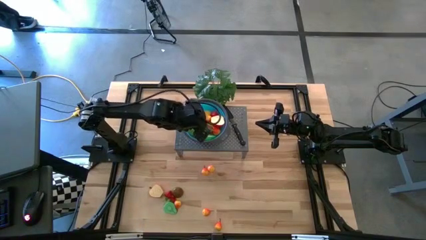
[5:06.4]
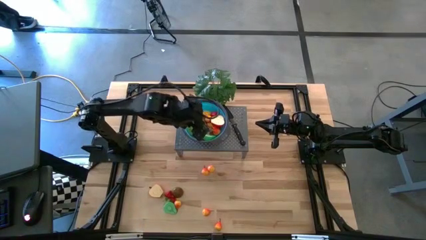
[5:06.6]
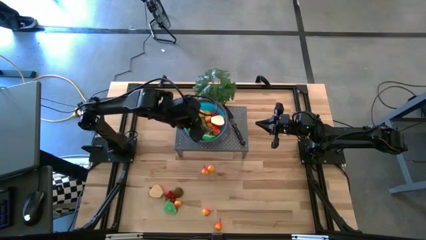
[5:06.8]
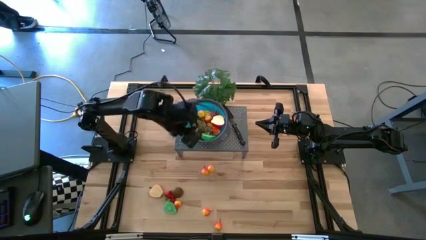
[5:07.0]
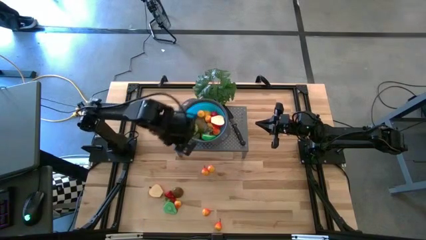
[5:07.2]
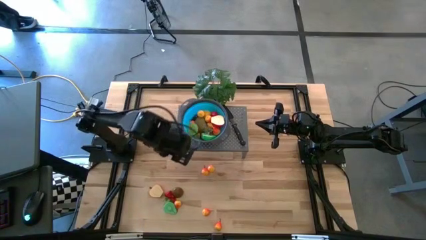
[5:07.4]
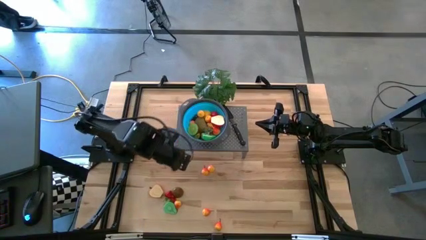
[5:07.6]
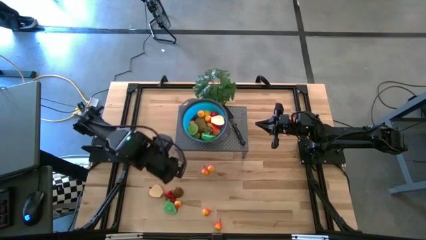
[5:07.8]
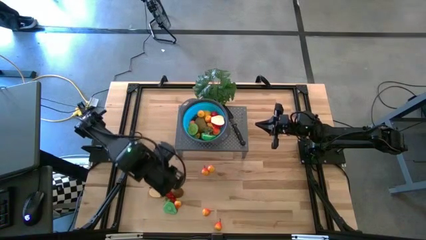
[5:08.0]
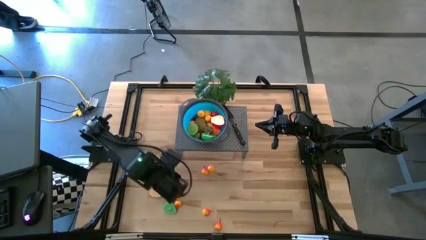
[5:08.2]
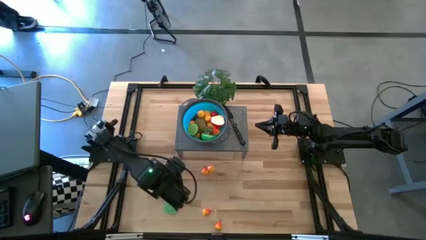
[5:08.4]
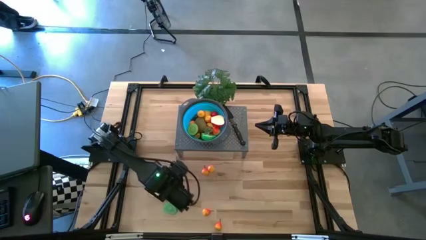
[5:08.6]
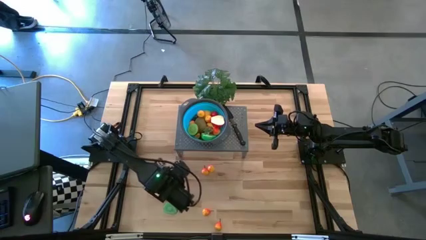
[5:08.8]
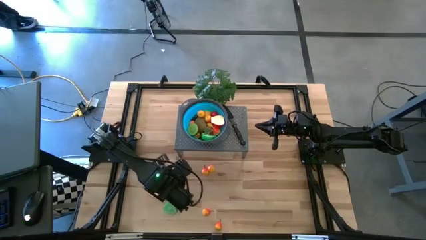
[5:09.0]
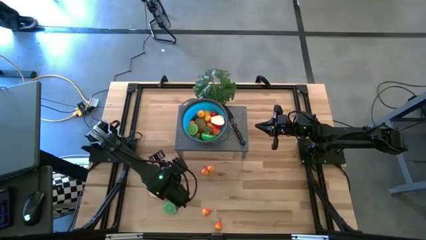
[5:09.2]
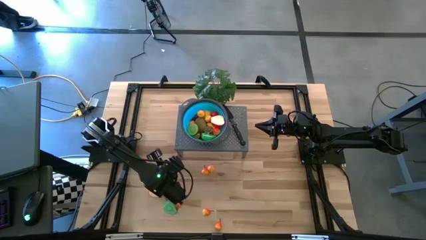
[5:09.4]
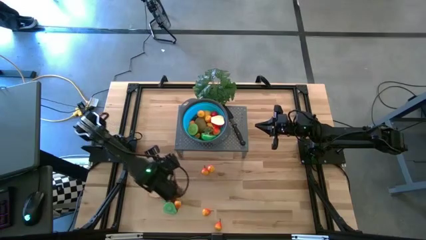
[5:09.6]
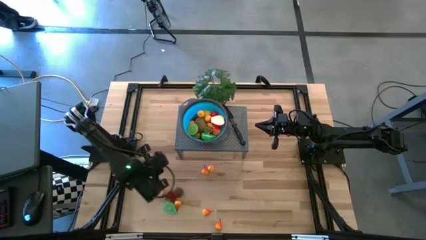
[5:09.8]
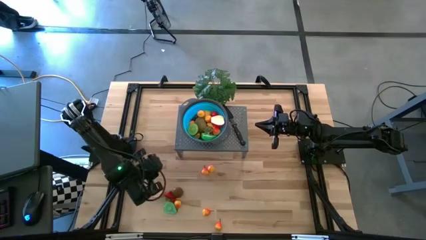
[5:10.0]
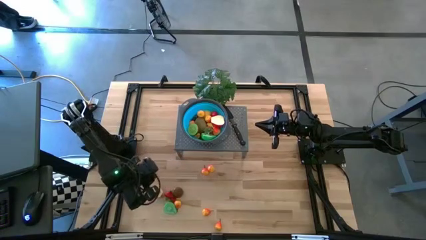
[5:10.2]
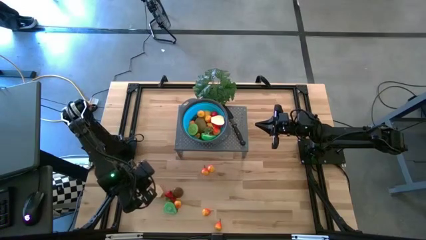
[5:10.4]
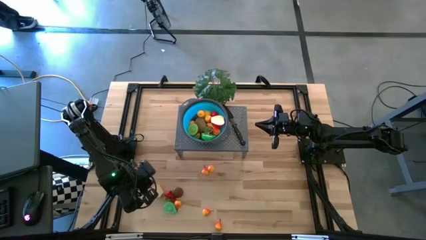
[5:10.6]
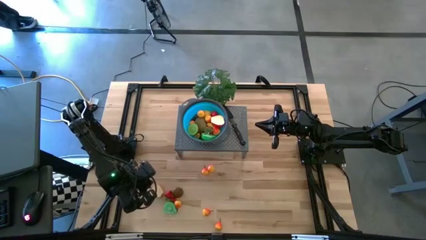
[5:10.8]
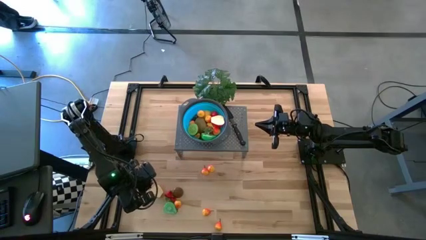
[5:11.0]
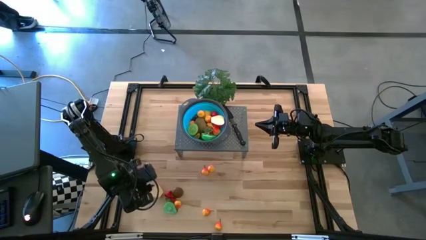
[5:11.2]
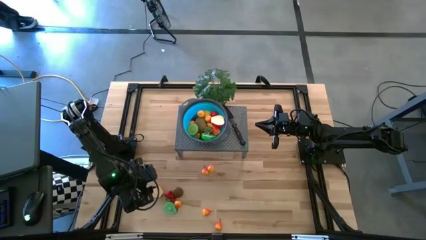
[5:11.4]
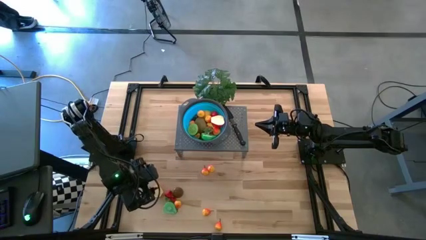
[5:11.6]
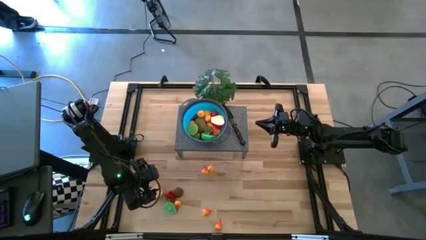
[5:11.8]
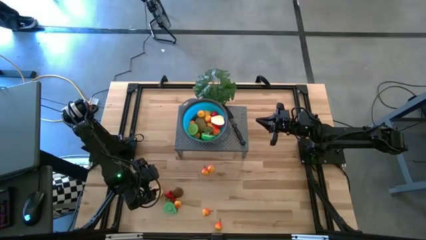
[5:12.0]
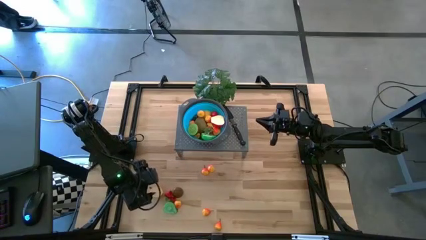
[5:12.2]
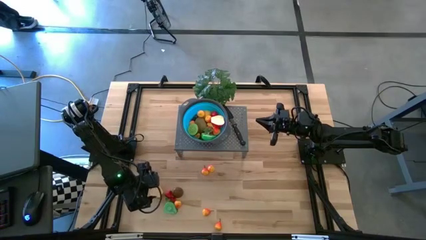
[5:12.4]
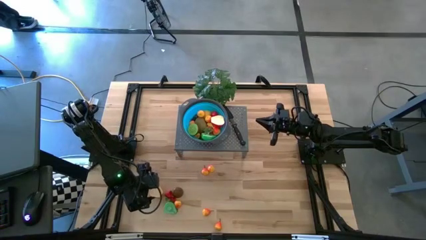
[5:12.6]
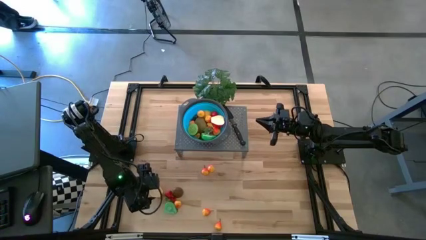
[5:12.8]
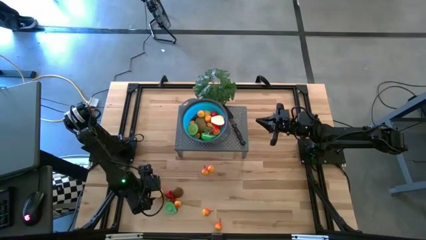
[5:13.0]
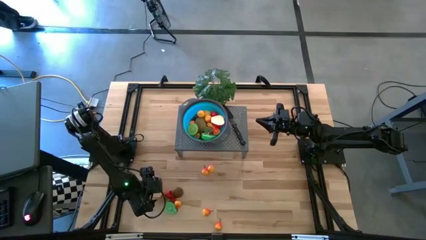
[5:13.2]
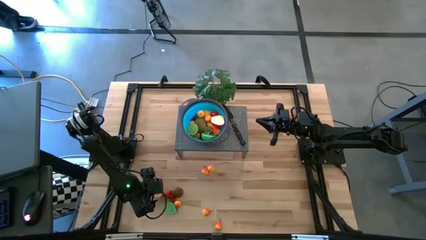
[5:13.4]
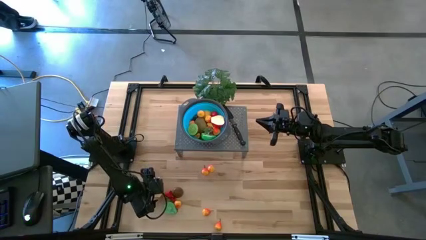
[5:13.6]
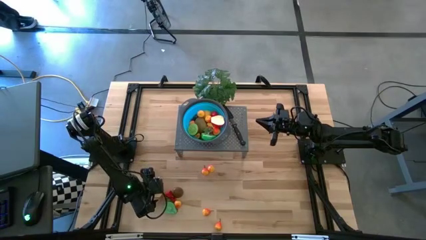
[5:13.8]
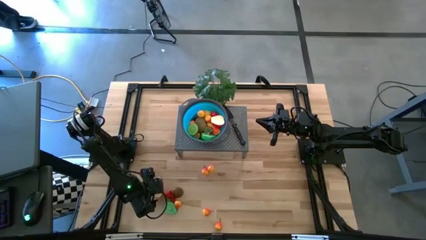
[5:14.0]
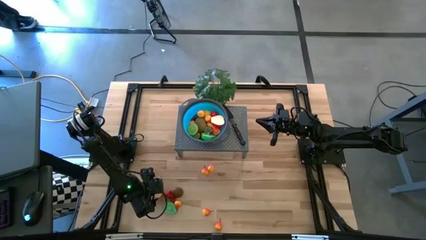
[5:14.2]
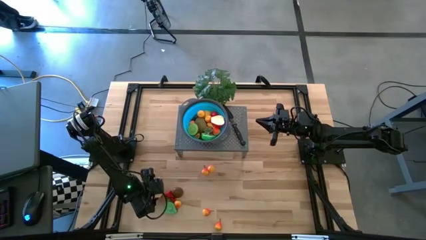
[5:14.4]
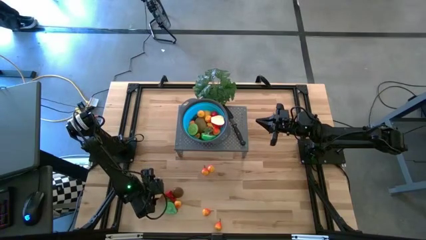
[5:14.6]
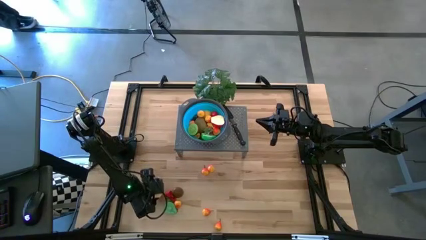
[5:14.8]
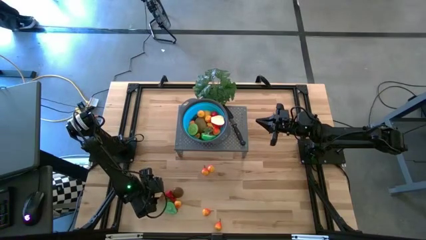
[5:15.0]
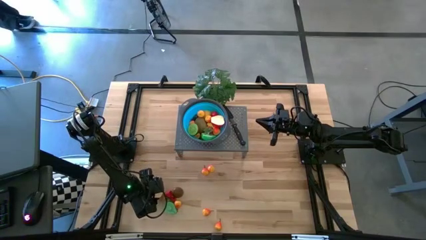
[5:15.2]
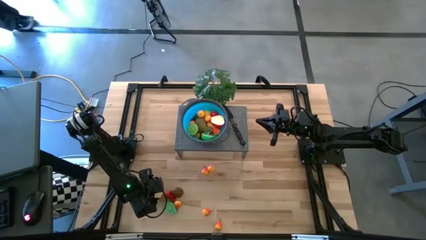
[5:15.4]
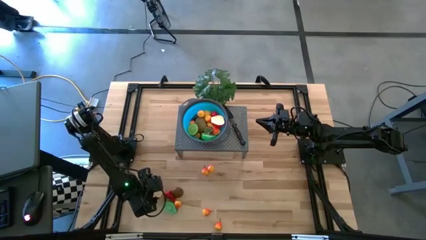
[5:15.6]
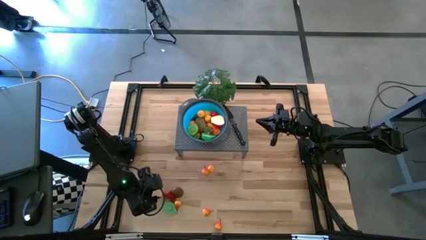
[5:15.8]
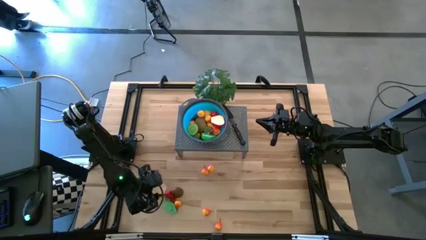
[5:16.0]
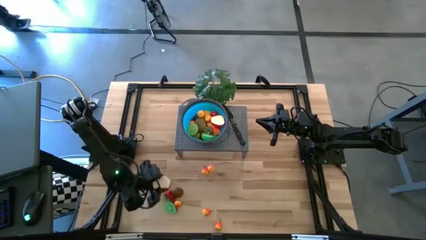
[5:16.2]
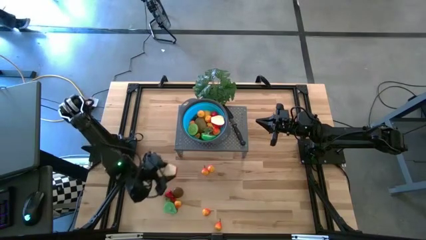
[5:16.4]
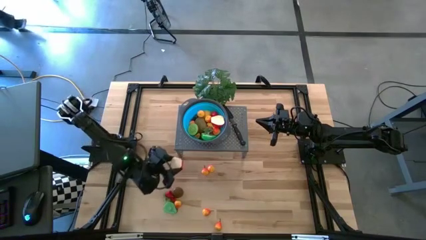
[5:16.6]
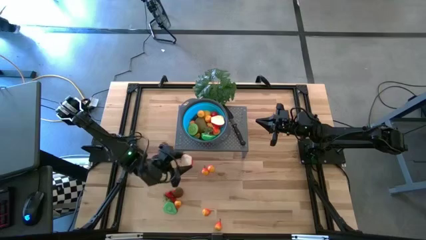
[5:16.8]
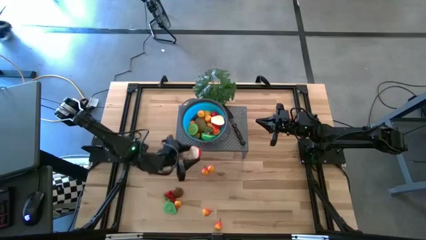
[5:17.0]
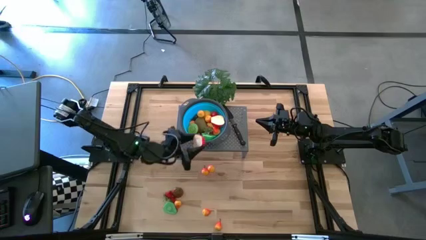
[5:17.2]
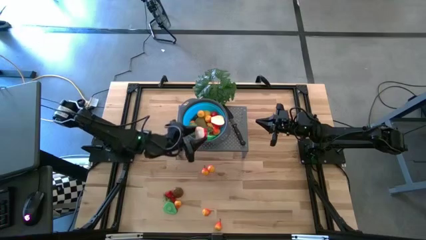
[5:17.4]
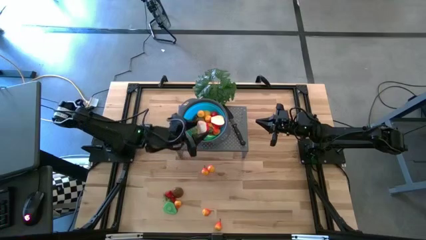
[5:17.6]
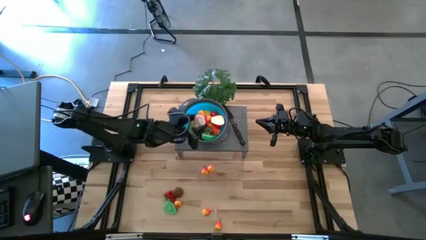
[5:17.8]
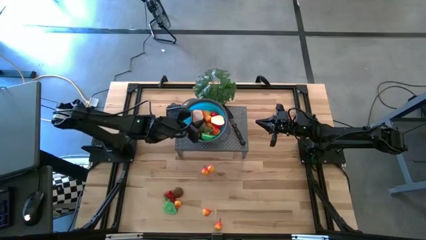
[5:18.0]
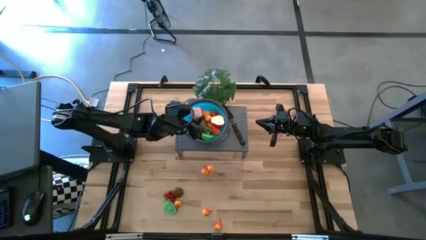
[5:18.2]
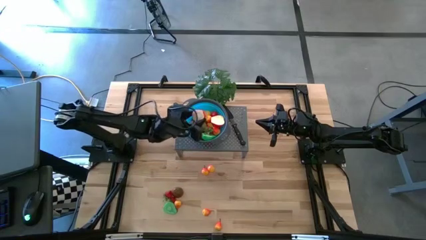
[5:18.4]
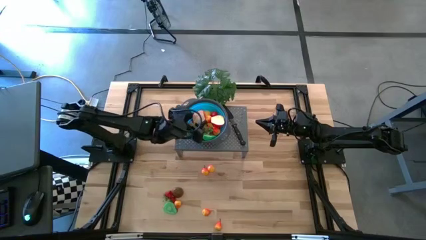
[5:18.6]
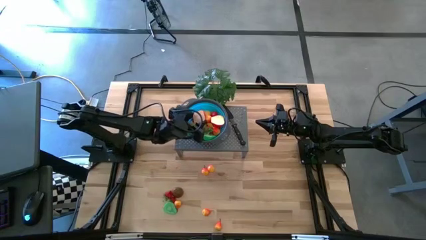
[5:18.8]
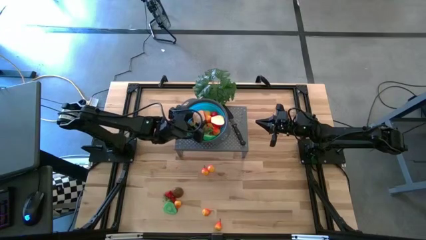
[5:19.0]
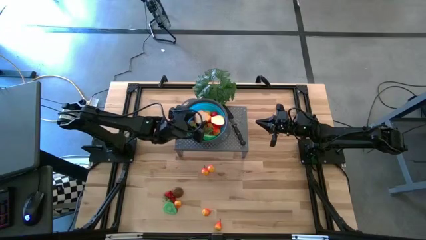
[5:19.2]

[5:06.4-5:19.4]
Task: Pick & Place Fruit
Put the apple into the blue strainer bowl on the shelf
